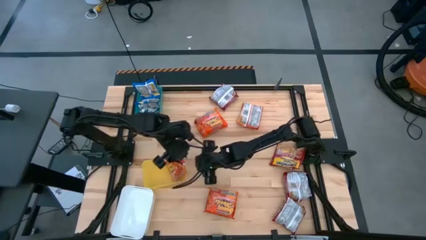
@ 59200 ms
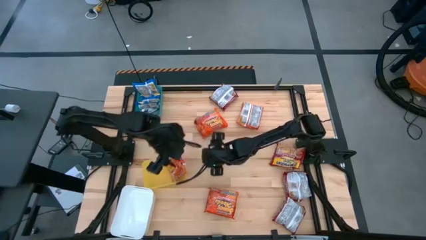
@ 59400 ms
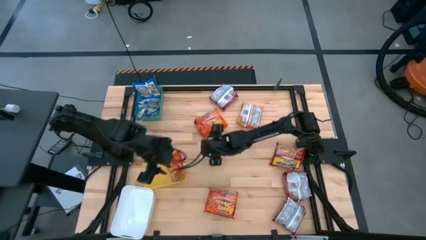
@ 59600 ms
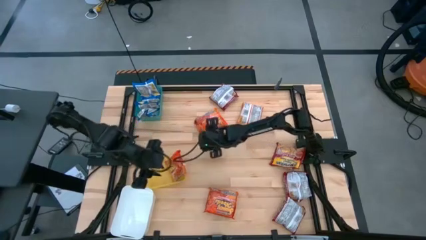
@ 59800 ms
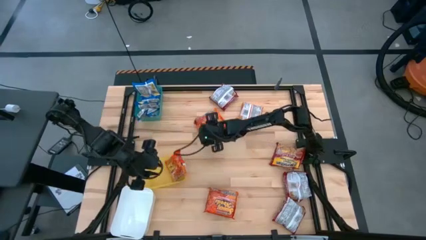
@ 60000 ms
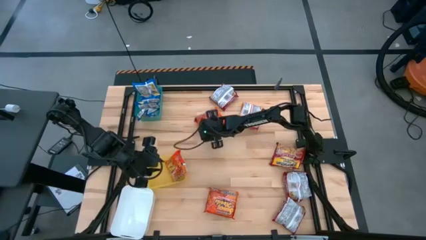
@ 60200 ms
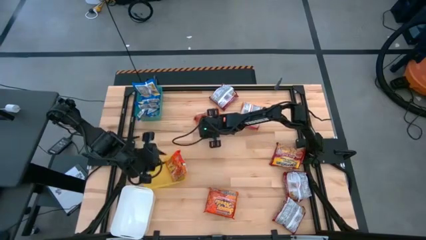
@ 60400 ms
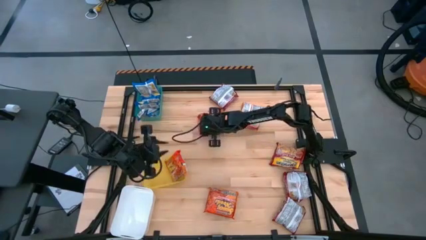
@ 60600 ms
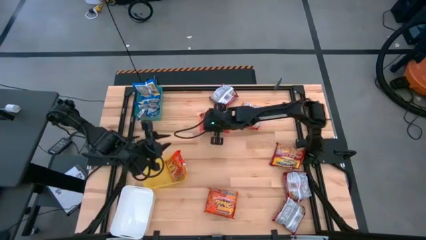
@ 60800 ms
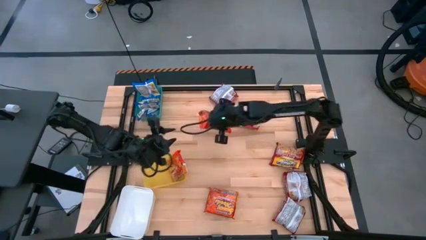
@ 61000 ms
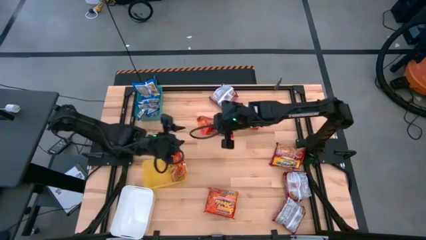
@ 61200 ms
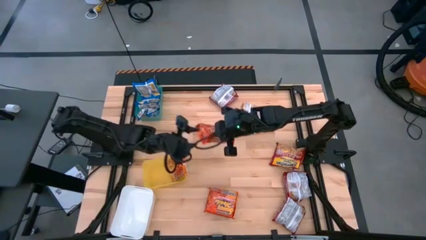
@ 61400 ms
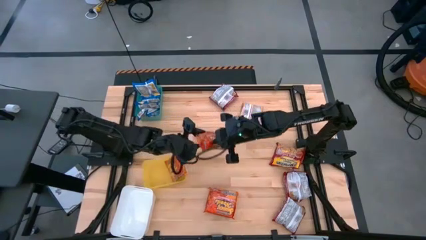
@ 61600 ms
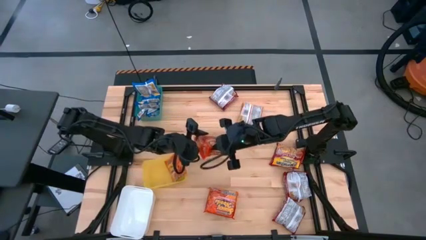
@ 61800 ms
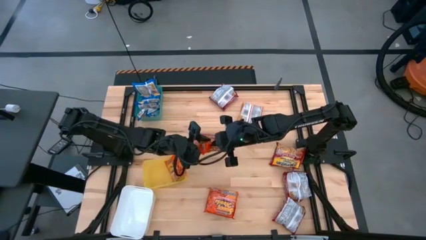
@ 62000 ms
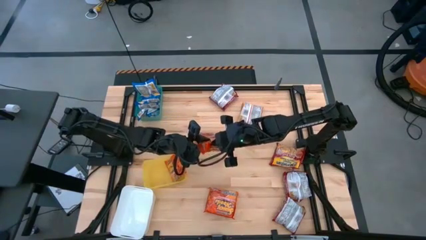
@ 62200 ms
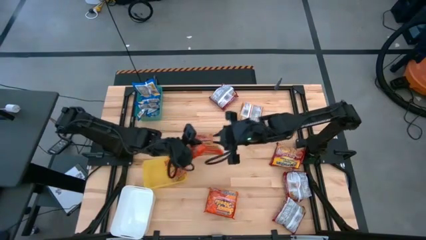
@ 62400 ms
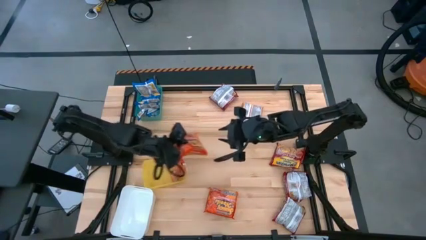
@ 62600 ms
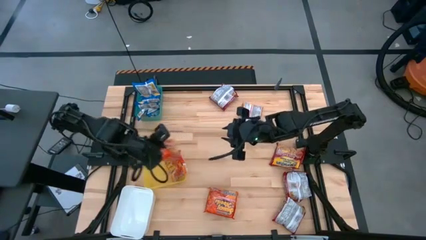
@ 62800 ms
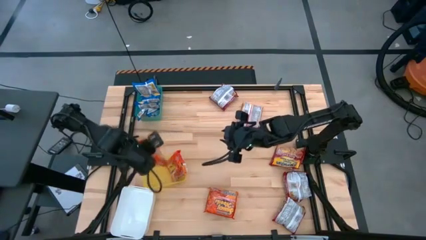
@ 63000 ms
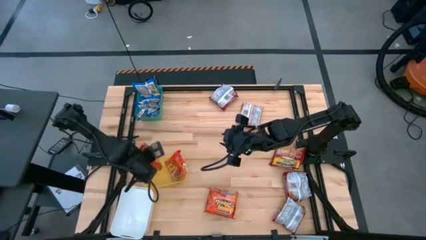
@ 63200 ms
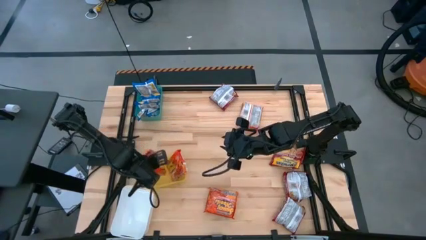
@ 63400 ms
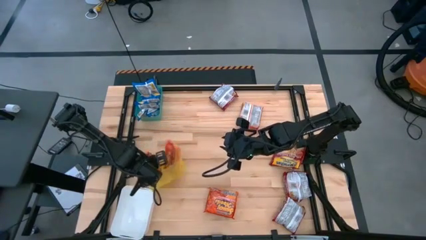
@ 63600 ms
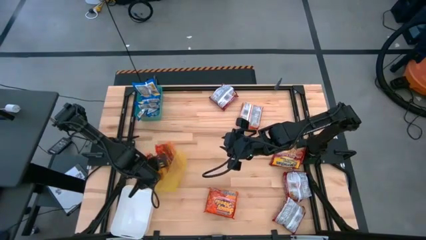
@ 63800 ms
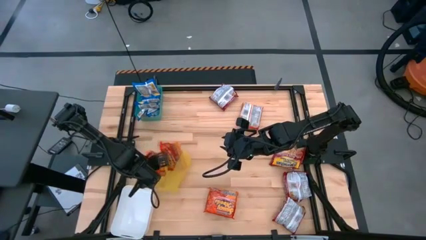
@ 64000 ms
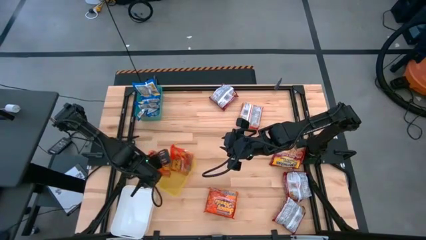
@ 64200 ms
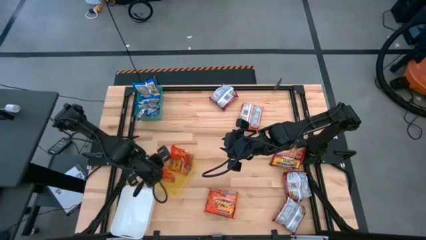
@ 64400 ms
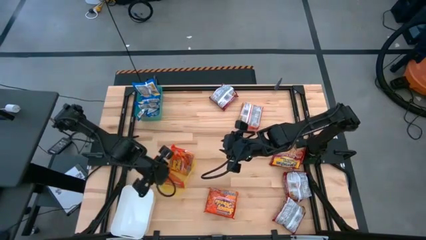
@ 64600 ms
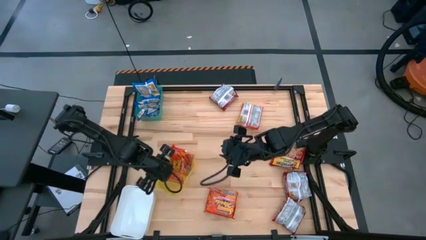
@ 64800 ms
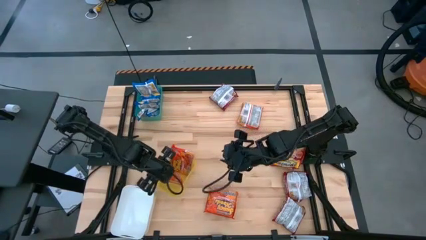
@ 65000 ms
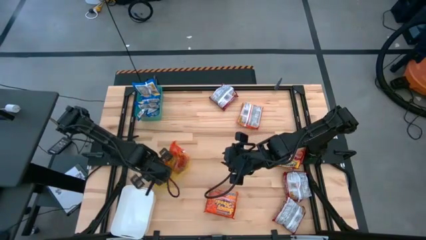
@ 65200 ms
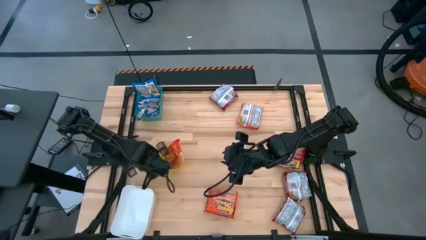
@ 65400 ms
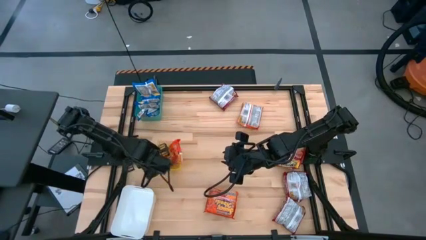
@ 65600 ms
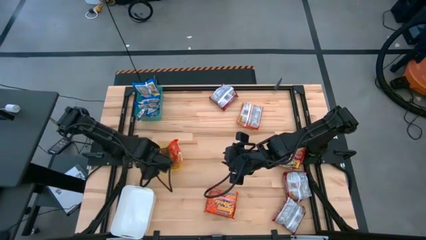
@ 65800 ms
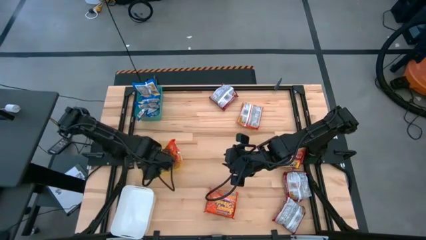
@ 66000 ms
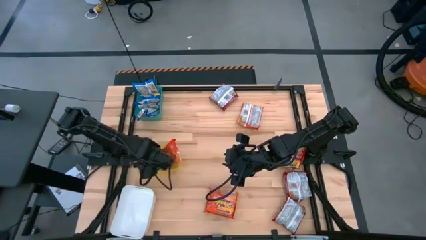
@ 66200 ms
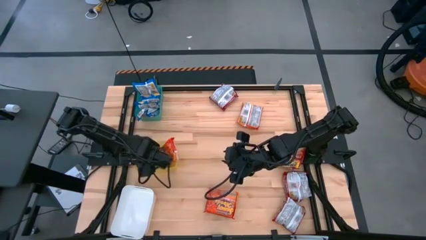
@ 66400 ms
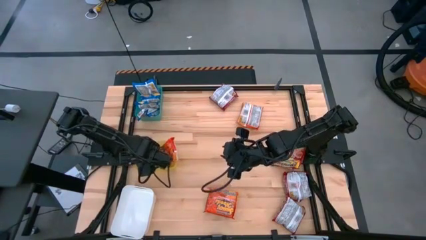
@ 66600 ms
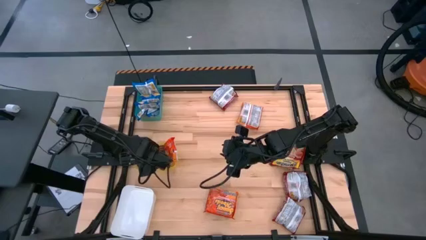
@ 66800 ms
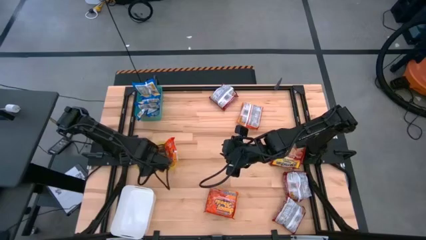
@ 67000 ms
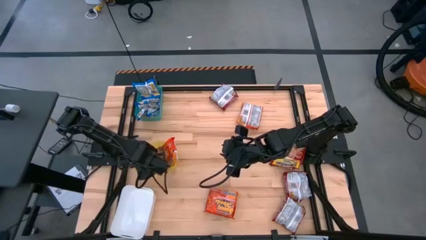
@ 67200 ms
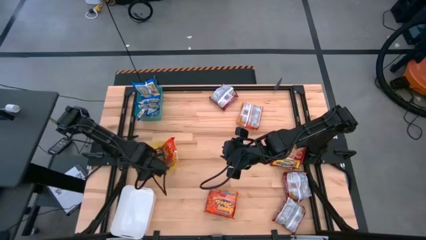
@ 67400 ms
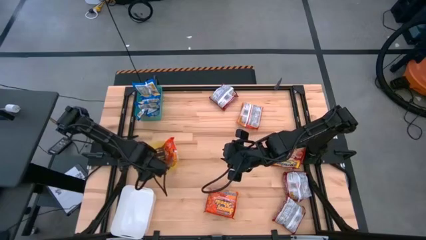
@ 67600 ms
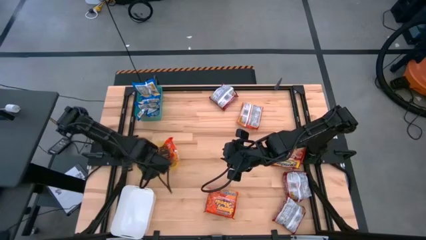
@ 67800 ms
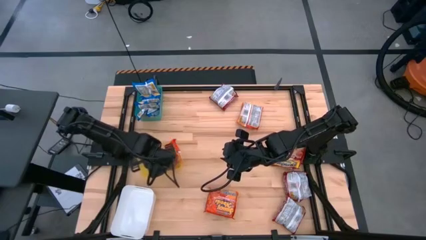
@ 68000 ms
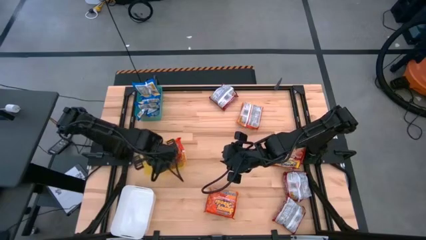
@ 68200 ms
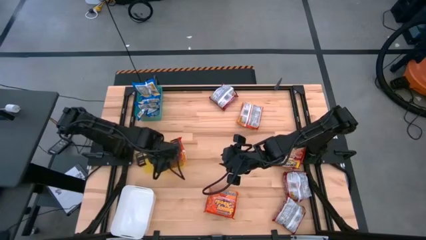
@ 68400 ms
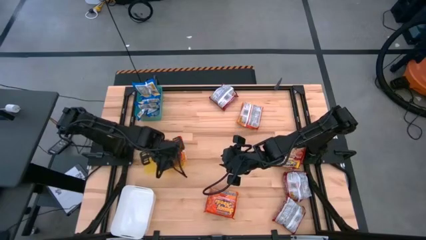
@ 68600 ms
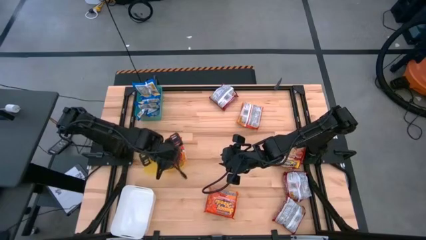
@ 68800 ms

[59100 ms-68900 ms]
Task: Sort Maruchan noodles
Put the orange noodle pack into the yellow bin

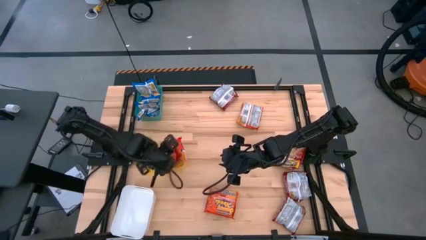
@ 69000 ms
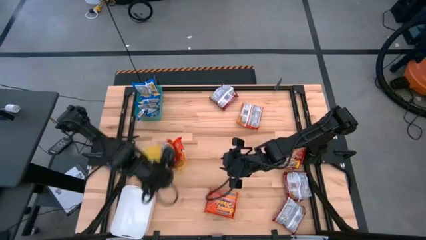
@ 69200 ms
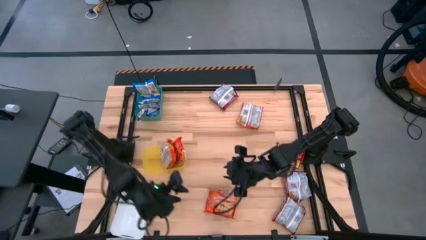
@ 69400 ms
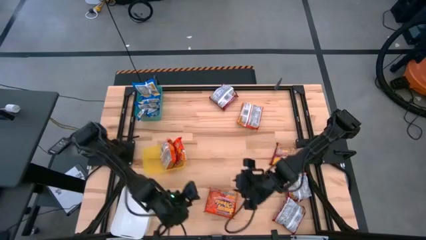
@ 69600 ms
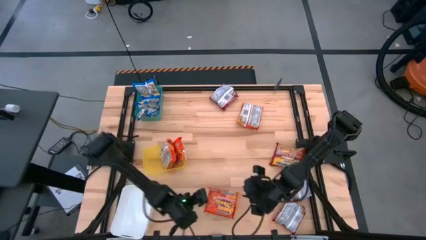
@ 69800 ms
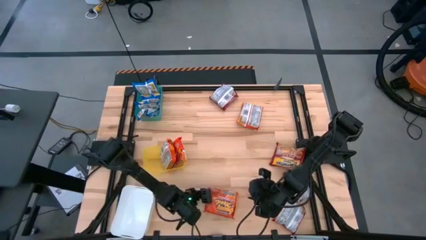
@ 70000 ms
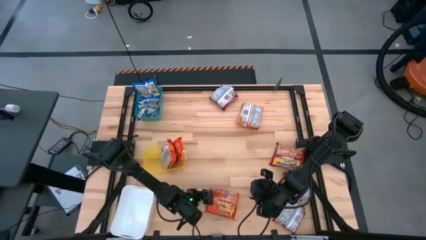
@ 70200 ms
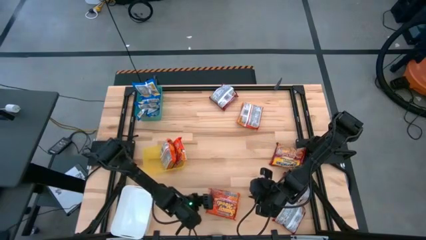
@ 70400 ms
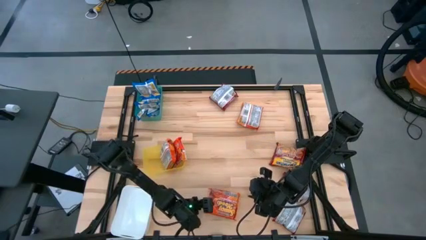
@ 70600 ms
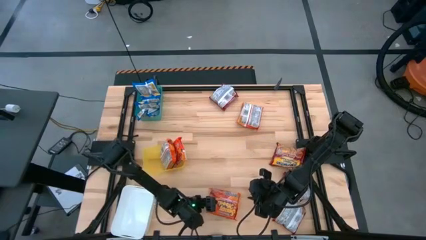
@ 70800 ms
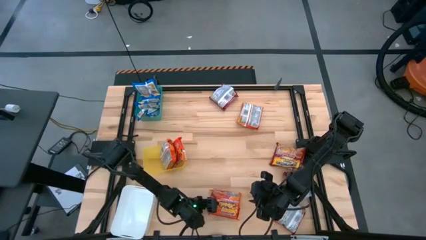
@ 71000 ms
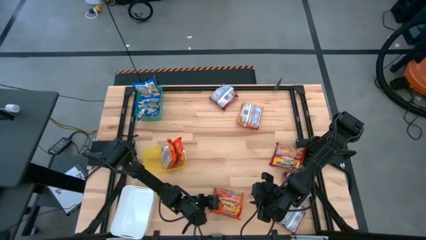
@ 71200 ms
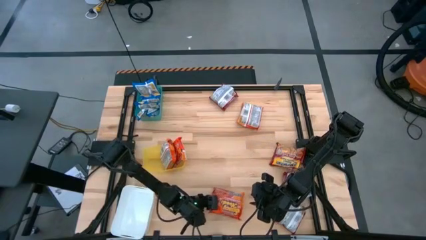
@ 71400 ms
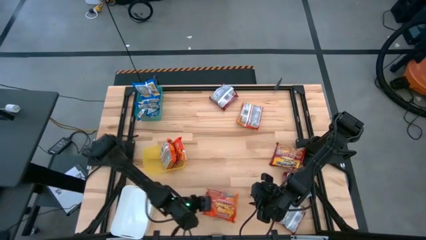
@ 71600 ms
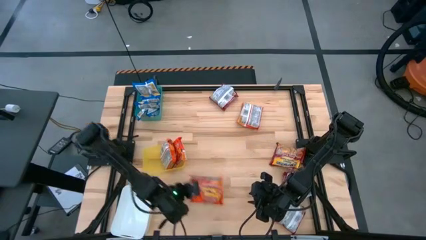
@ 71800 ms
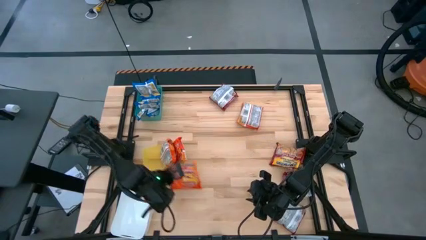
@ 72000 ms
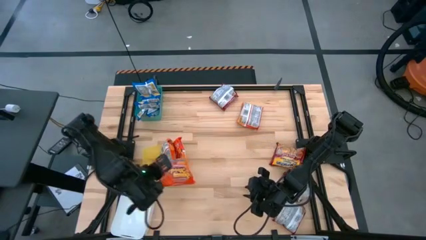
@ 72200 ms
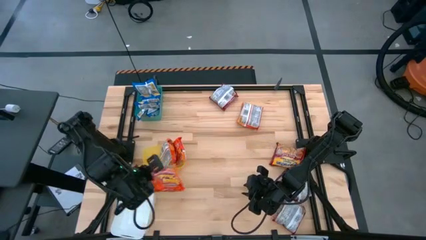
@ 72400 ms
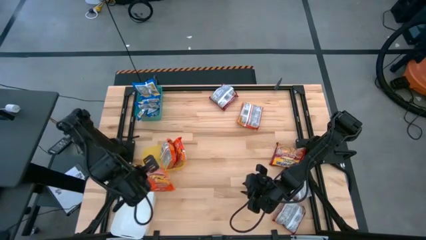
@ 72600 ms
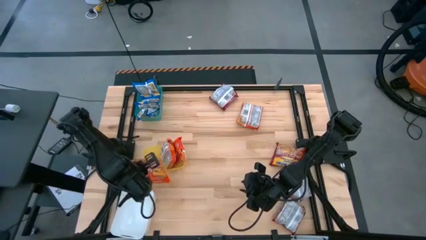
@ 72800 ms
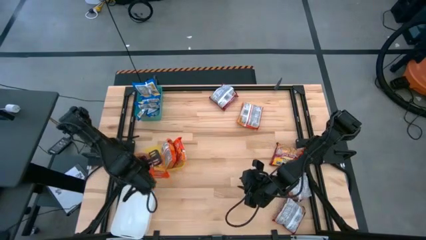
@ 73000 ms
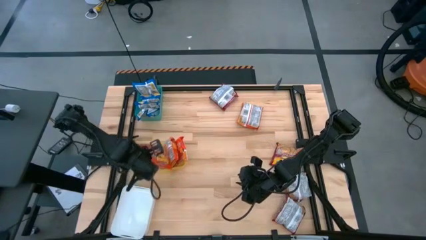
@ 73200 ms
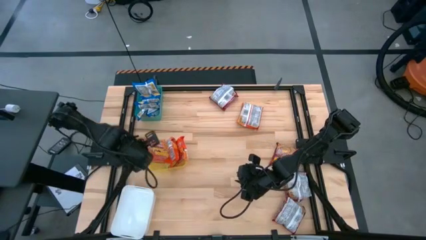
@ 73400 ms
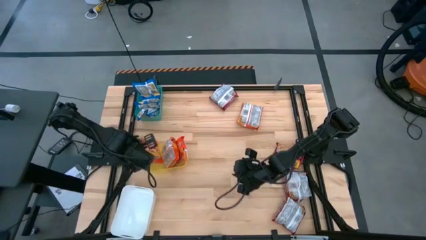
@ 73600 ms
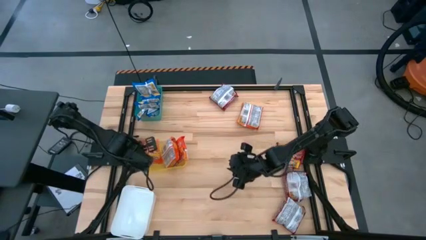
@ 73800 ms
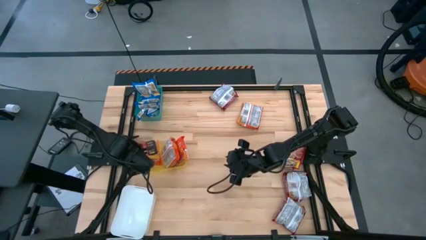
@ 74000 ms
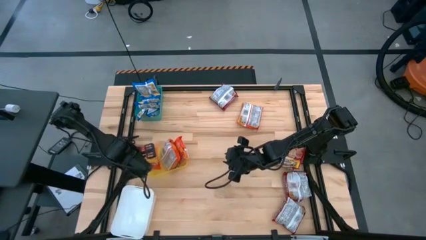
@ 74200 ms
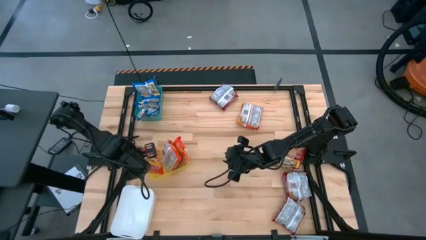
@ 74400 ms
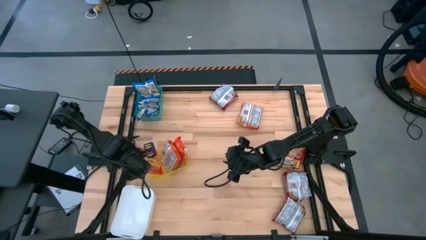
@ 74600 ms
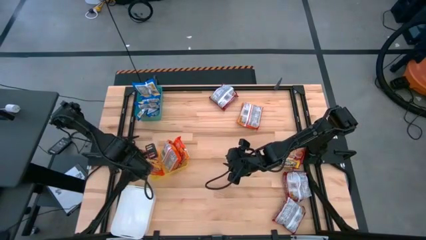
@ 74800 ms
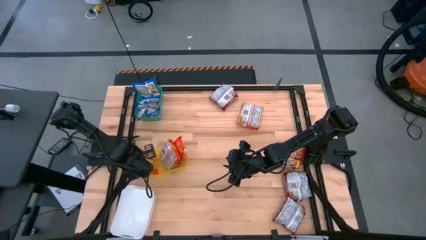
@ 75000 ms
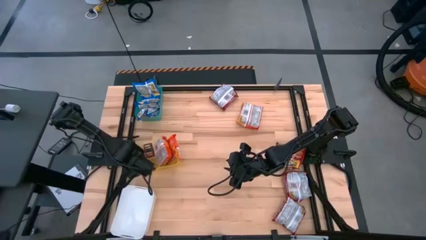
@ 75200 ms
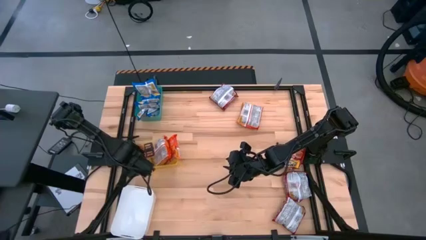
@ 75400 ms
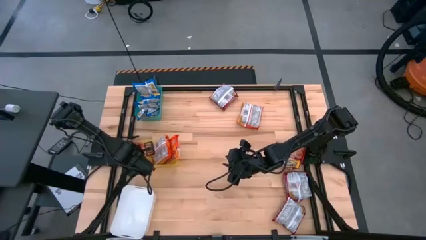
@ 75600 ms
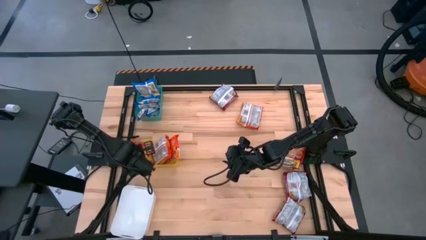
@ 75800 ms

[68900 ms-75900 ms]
Put the orange noodle pack into the yellow bin
